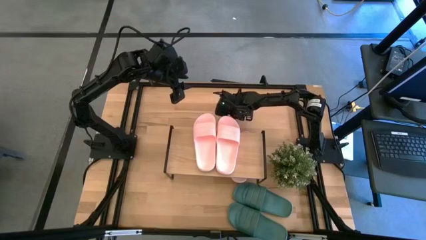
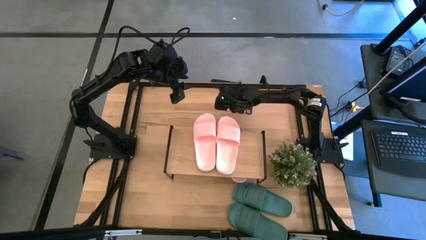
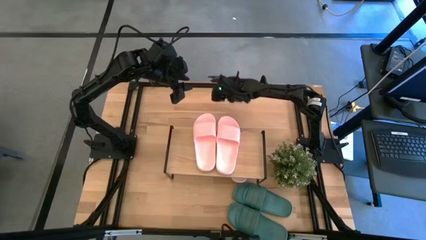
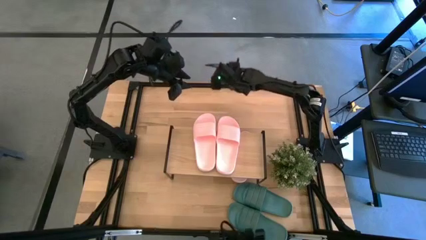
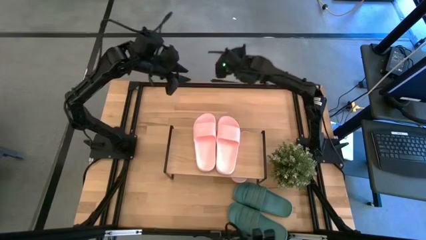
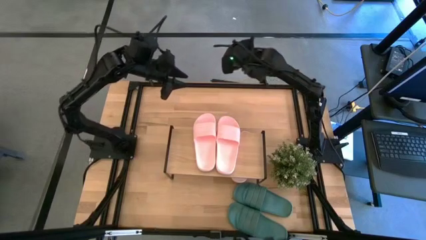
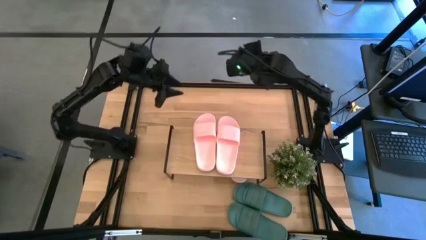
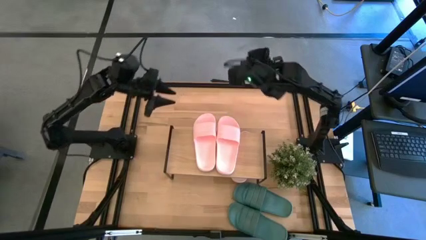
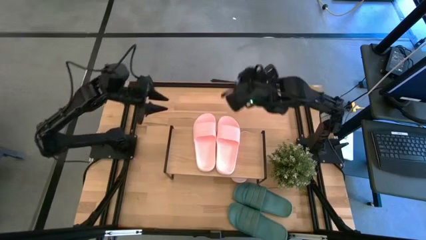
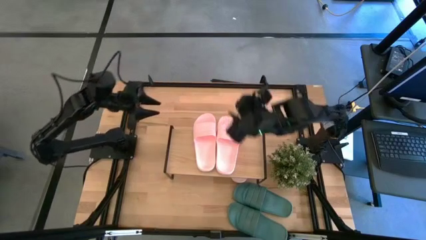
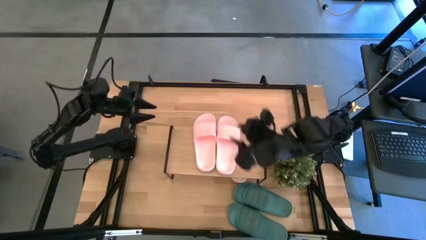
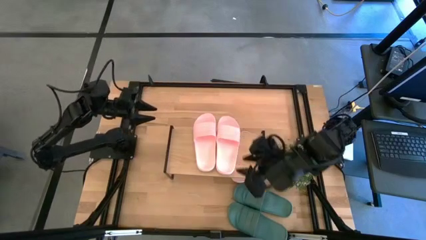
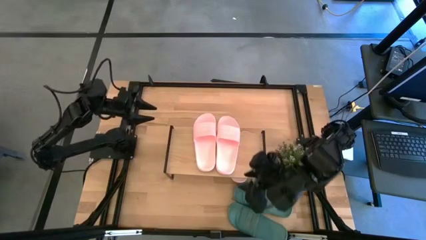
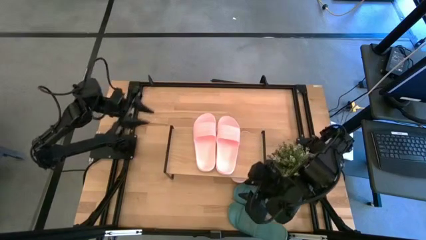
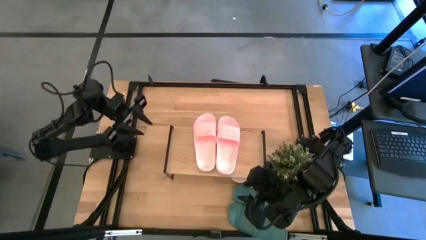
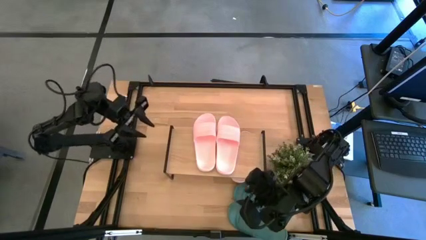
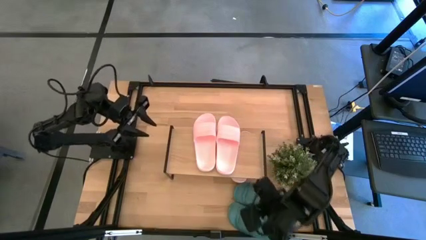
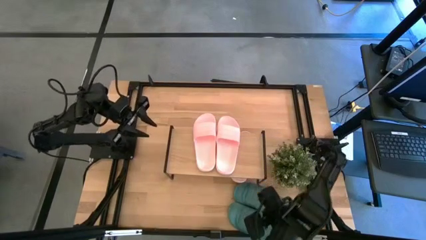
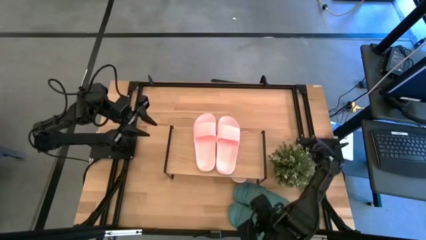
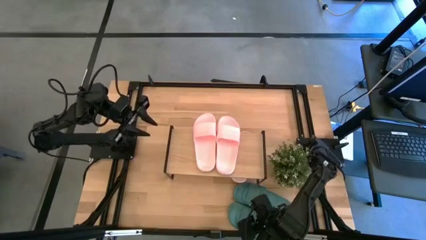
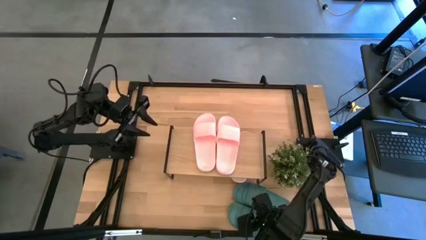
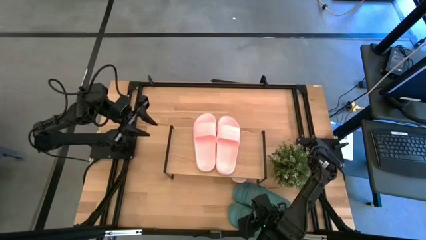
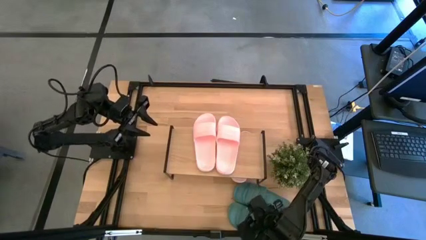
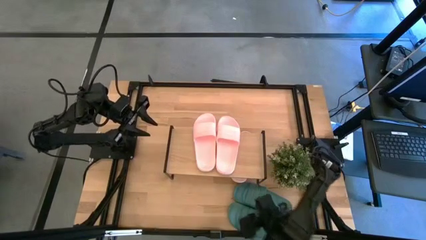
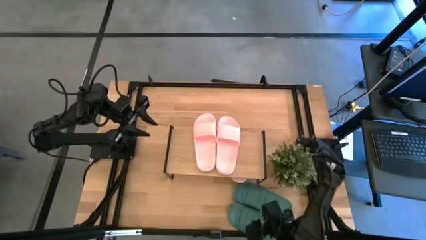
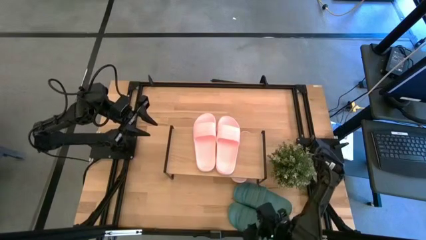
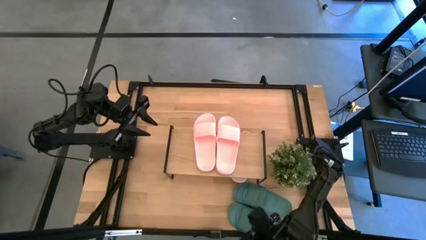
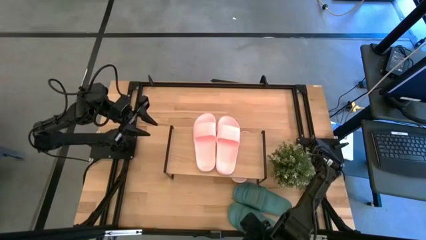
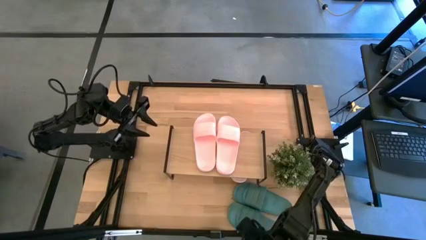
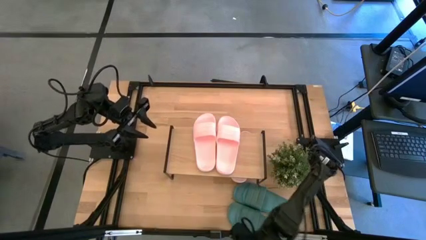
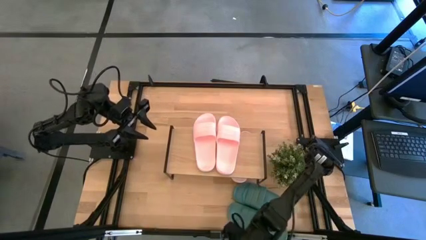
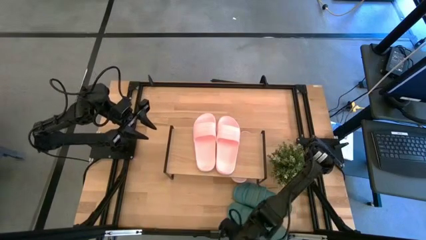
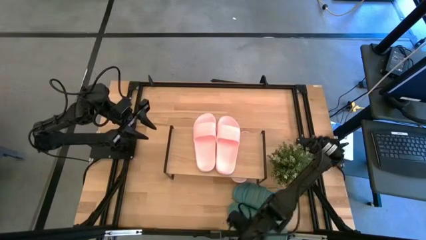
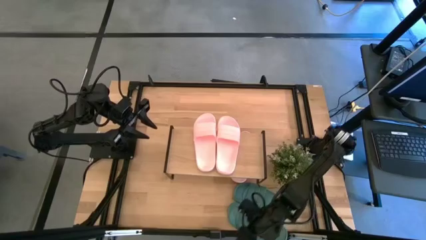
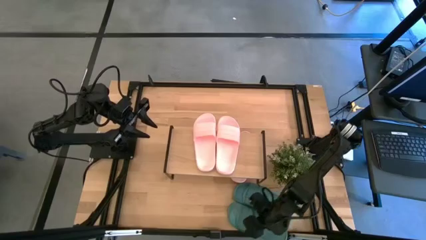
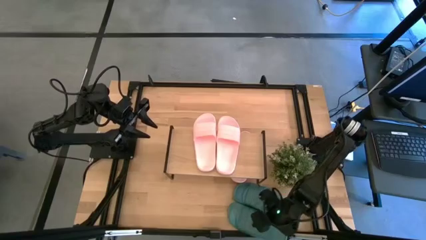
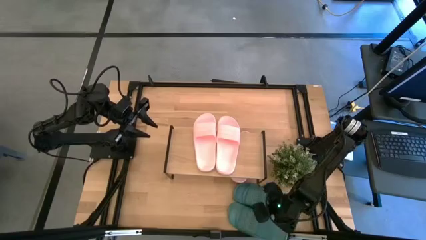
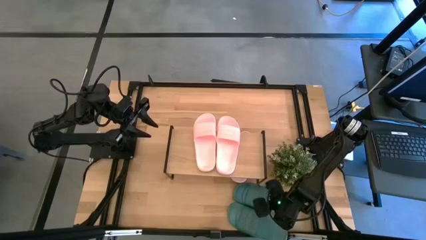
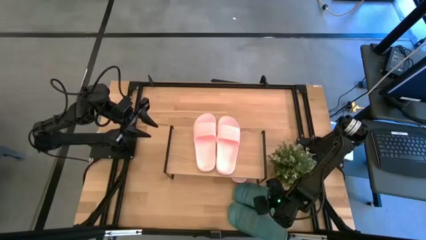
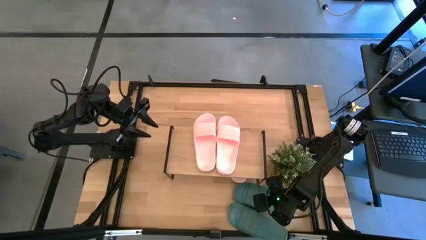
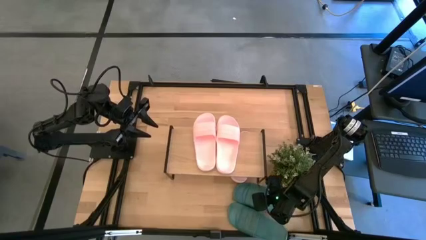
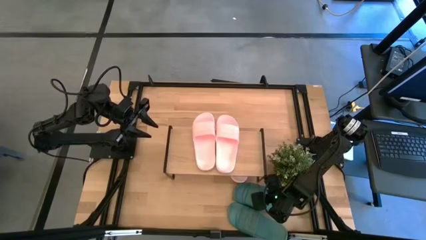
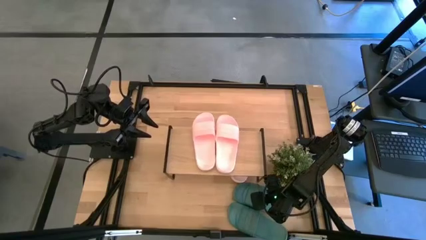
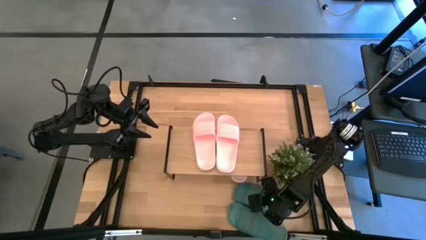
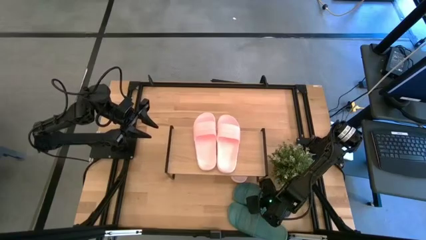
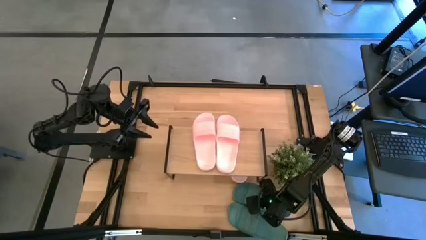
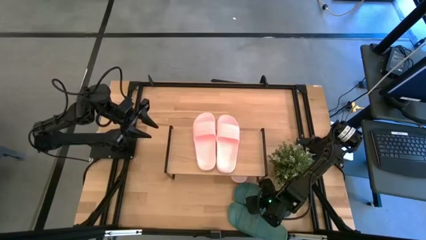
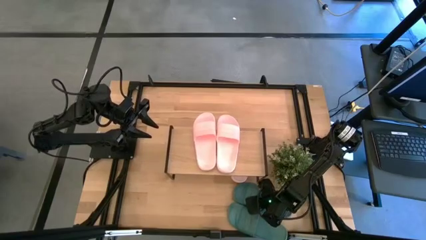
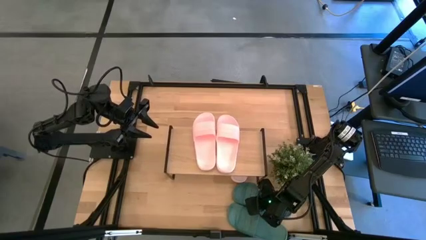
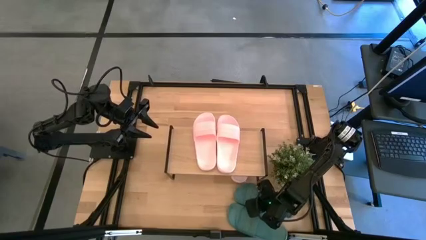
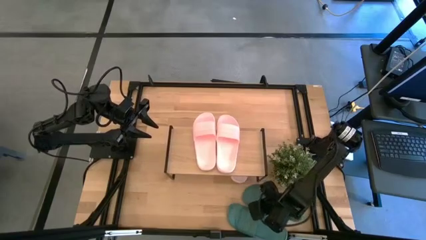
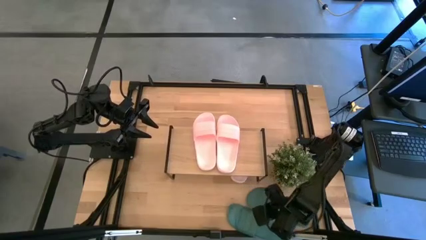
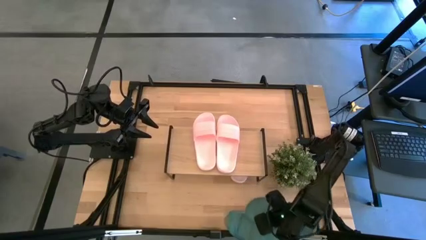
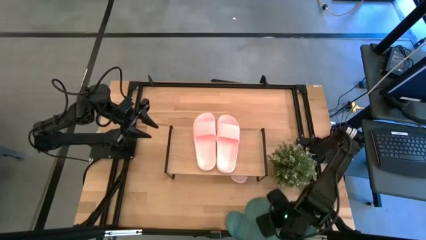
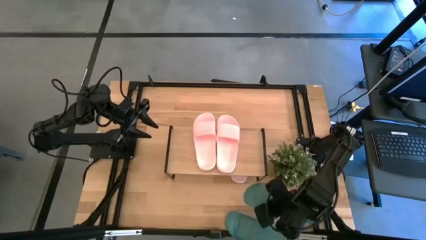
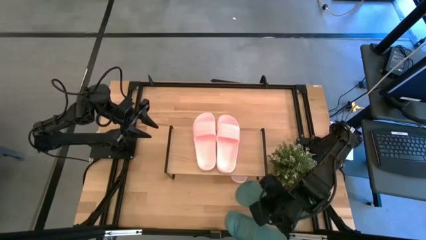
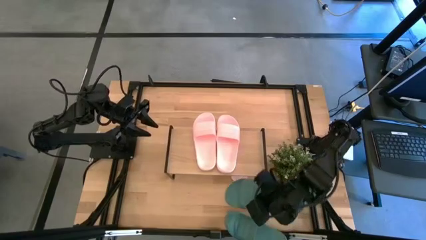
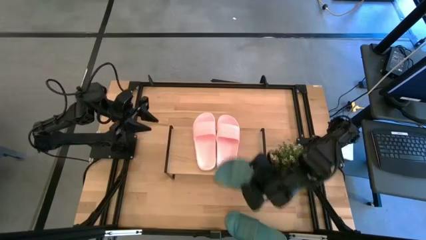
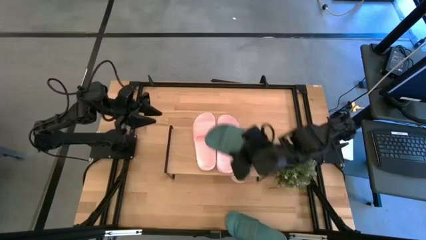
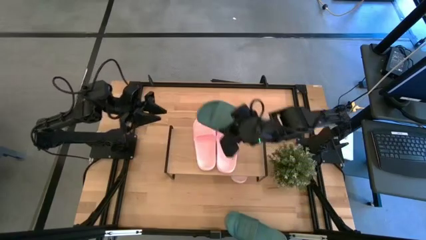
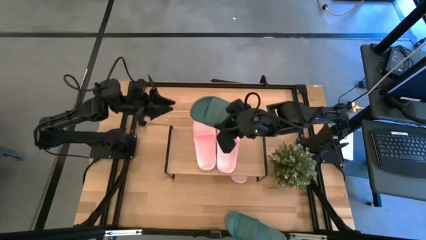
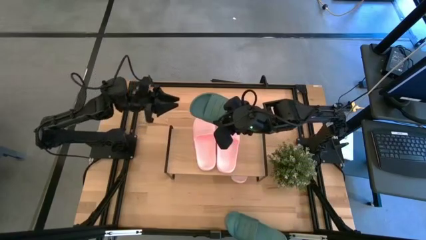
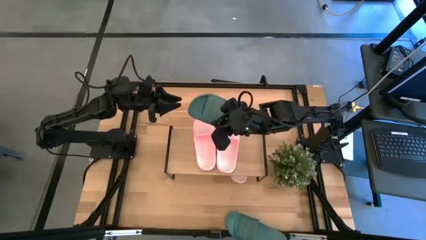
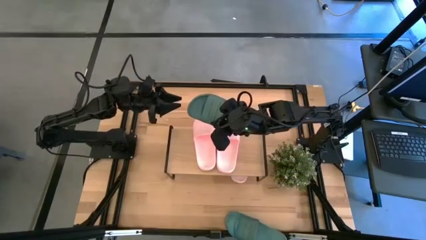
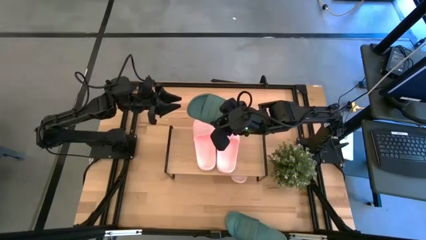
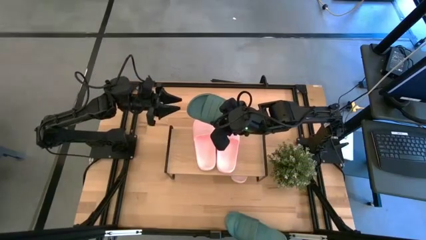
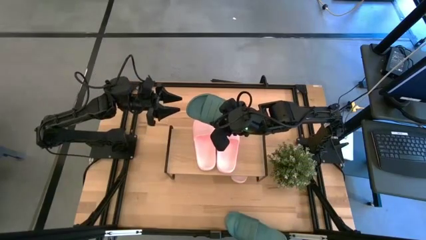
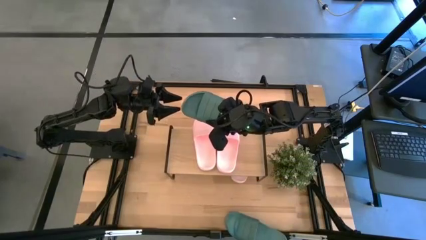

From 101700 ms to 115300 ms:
Task: Pick and place slides into the shelf
Put the green slipper under the shelf

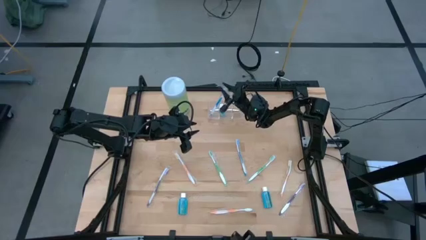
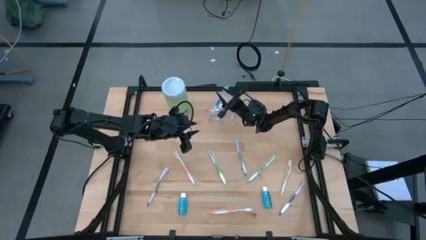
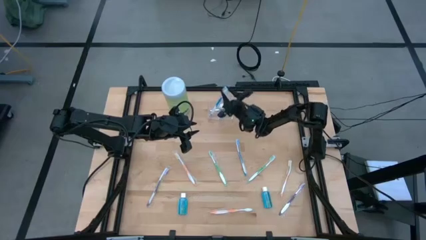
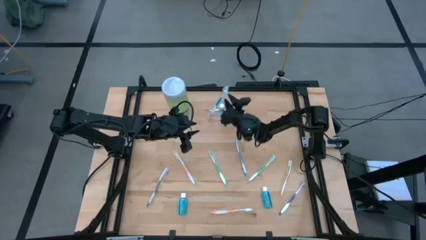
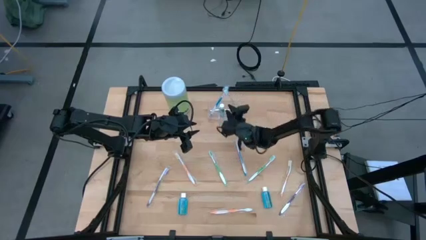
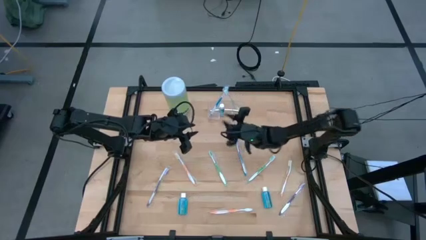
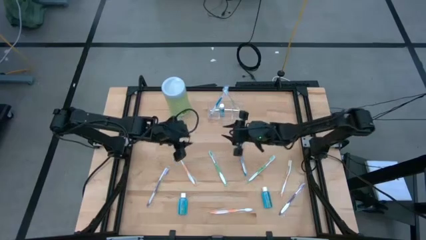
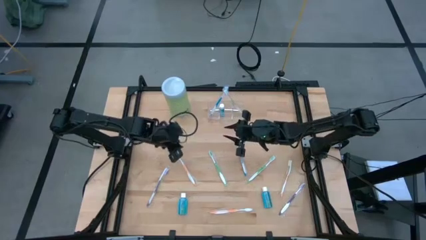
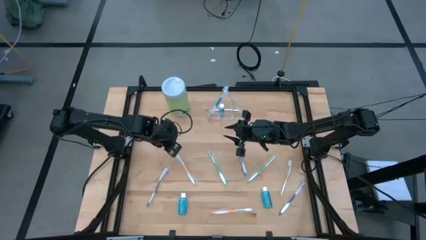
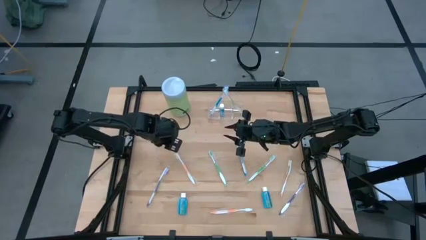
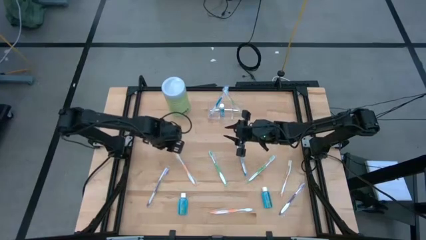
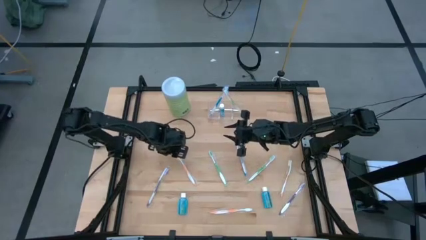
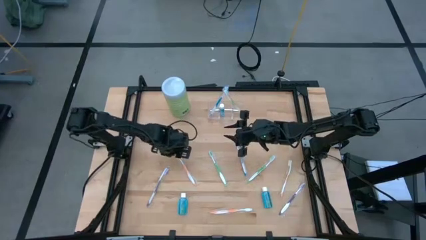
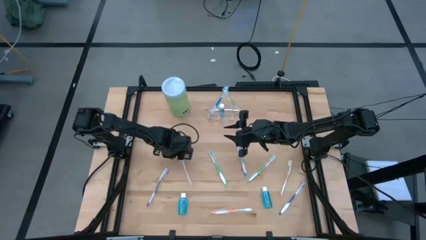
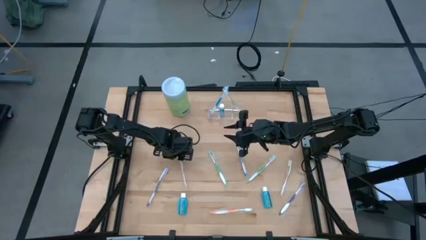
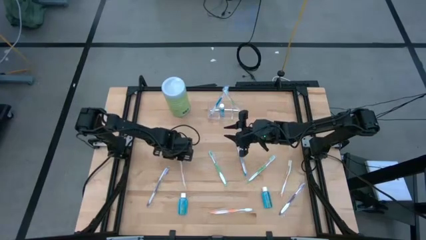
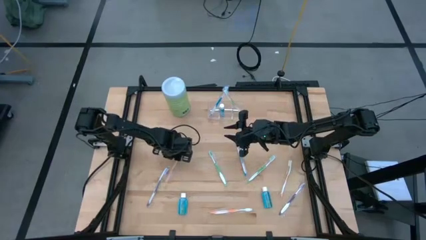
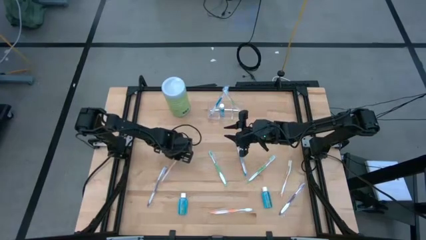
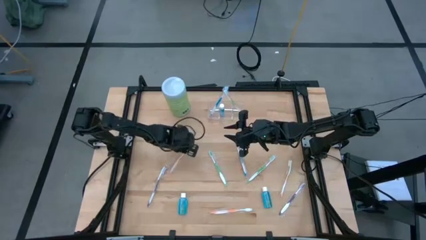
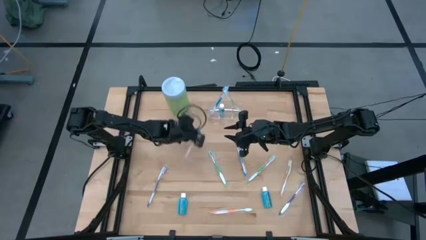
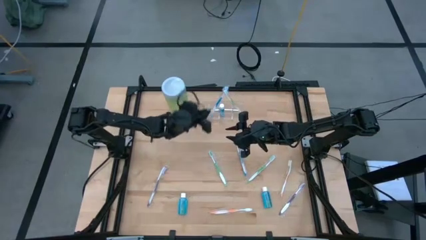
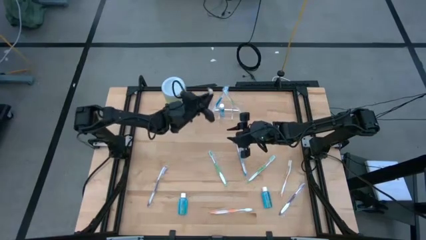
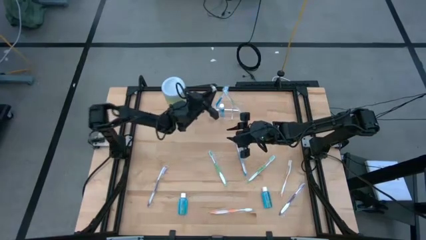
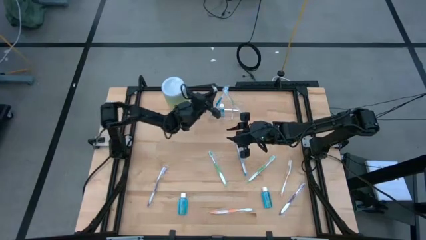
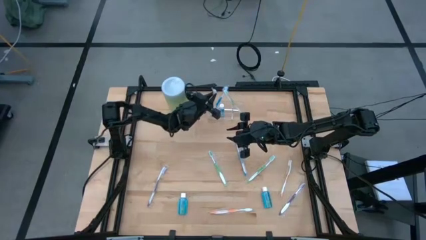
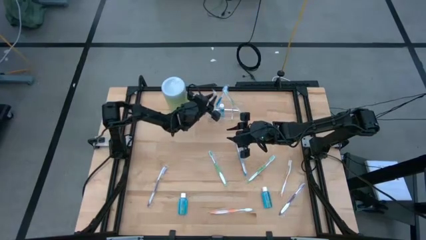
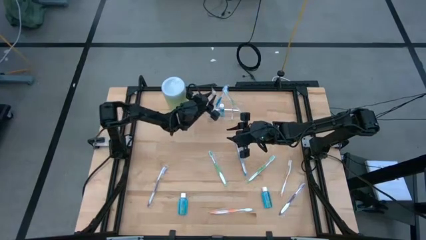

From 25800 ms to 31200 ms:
Task: Pick & Place toothbrushing station
Put the top left orange toothbrush into the transparent organizer
